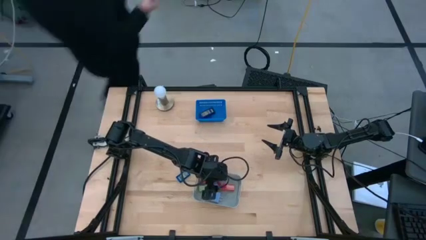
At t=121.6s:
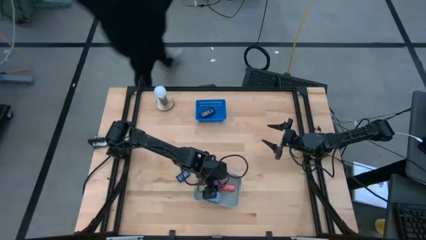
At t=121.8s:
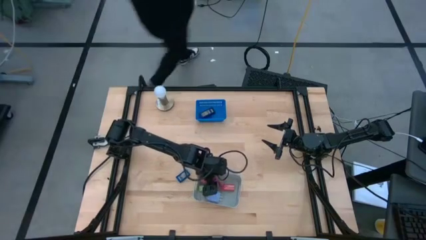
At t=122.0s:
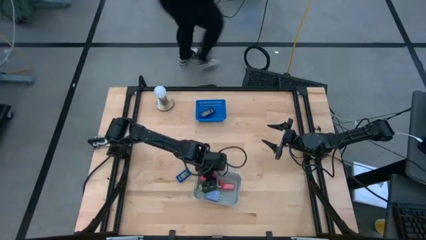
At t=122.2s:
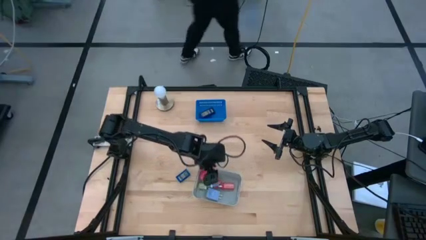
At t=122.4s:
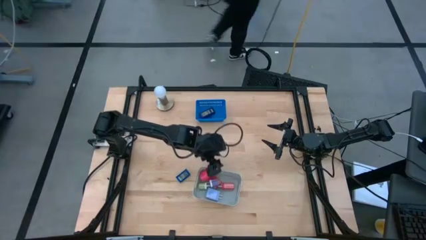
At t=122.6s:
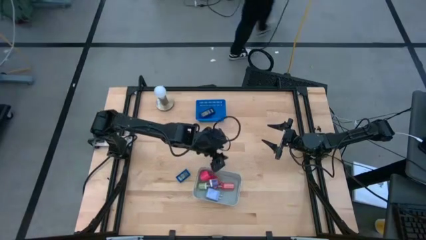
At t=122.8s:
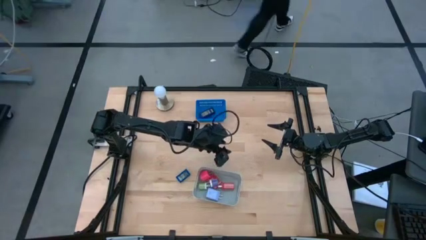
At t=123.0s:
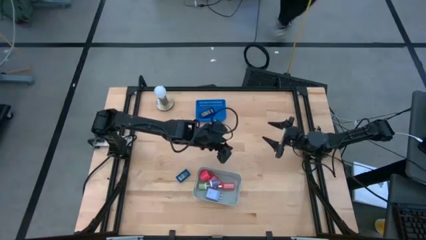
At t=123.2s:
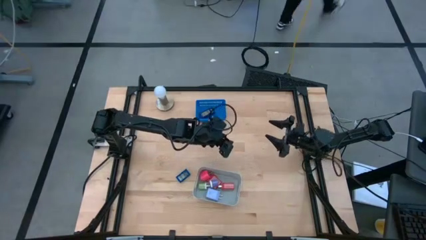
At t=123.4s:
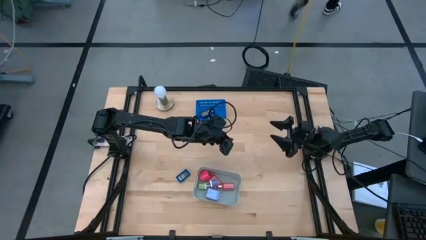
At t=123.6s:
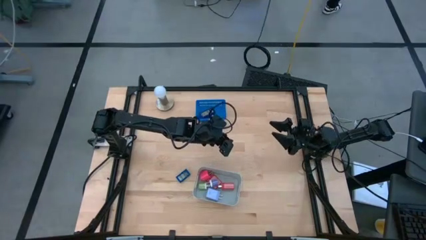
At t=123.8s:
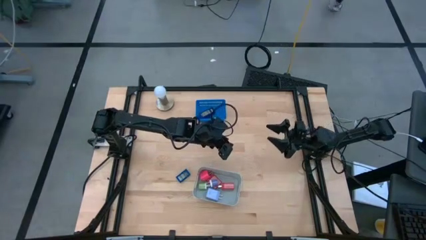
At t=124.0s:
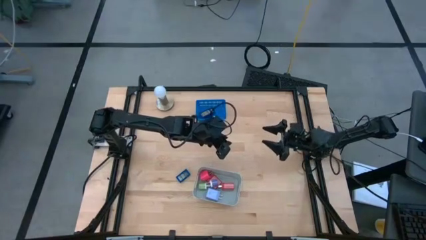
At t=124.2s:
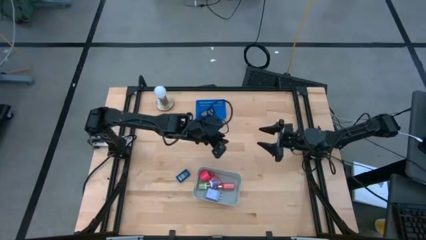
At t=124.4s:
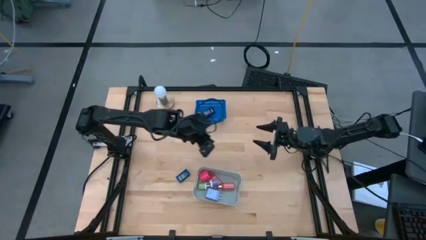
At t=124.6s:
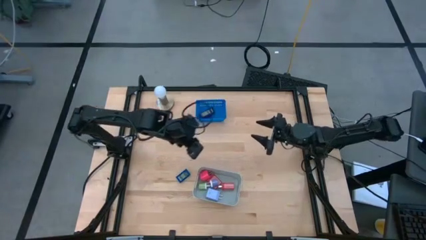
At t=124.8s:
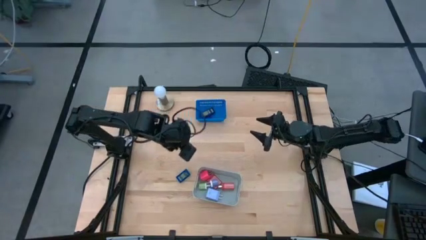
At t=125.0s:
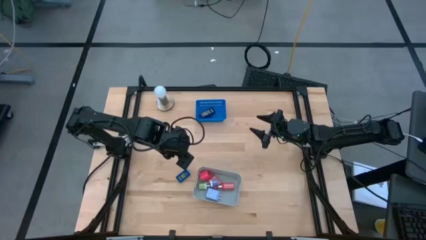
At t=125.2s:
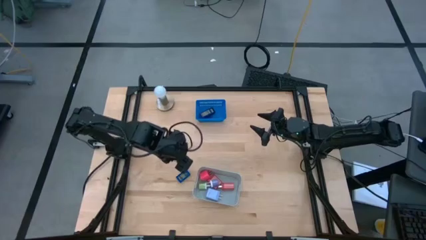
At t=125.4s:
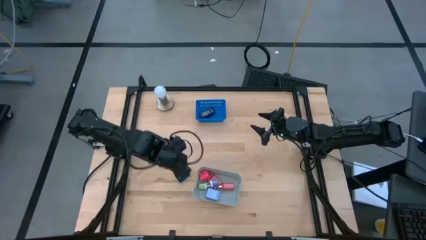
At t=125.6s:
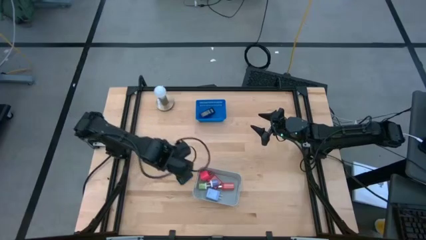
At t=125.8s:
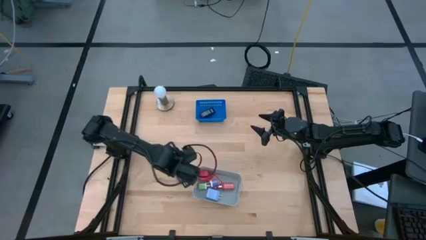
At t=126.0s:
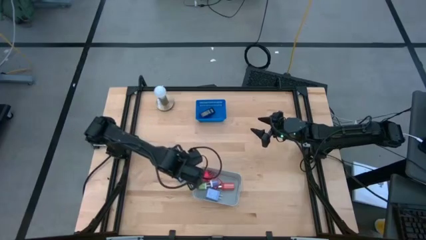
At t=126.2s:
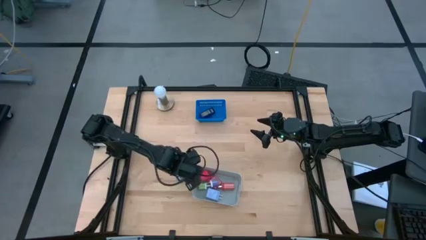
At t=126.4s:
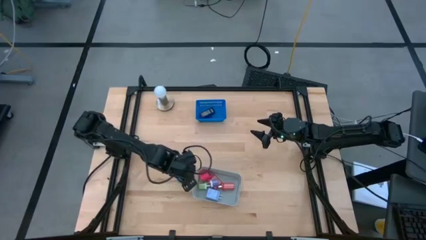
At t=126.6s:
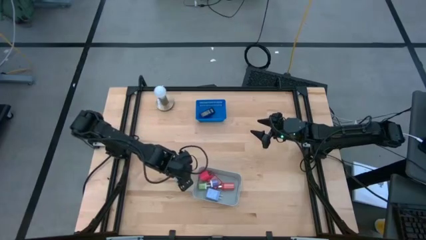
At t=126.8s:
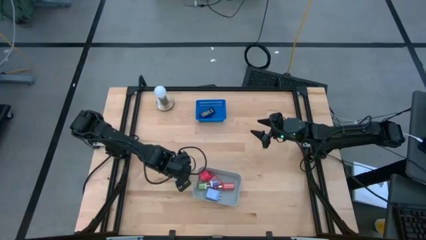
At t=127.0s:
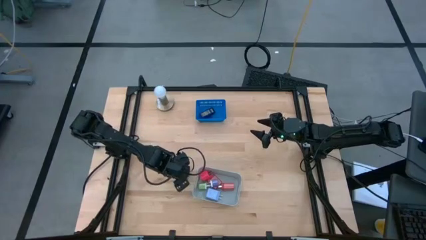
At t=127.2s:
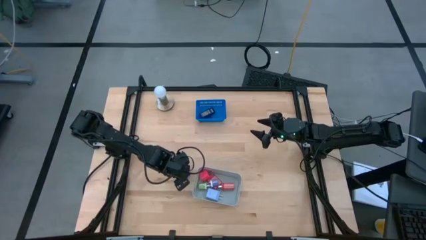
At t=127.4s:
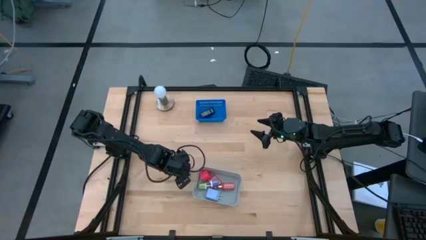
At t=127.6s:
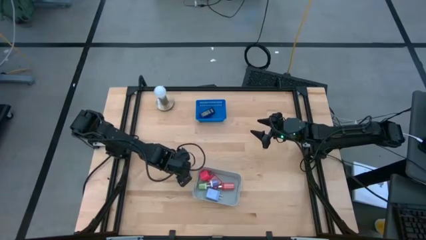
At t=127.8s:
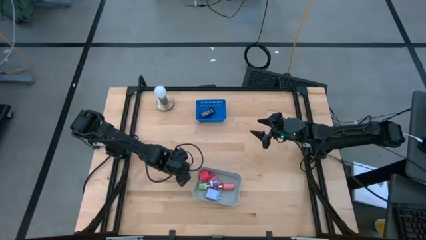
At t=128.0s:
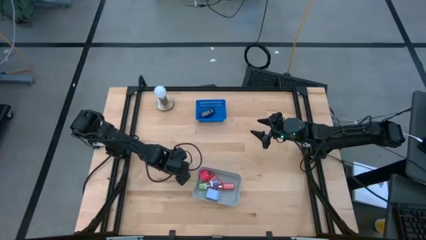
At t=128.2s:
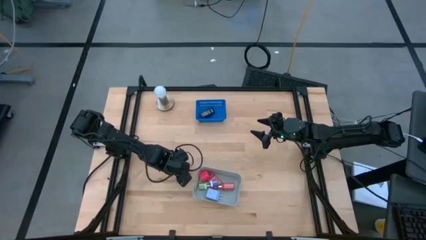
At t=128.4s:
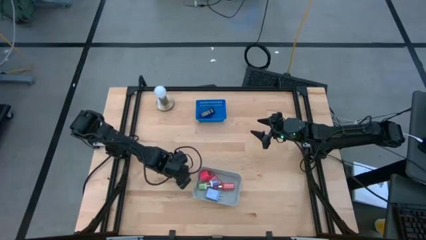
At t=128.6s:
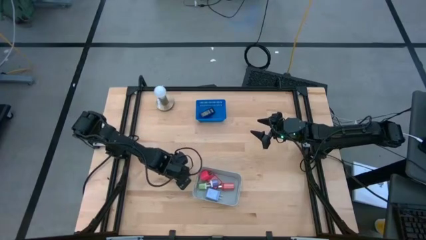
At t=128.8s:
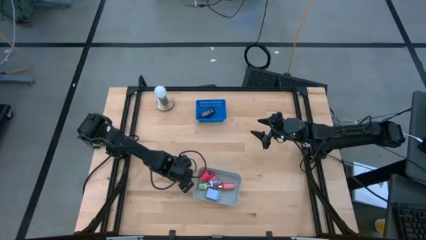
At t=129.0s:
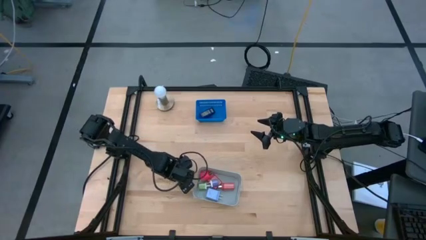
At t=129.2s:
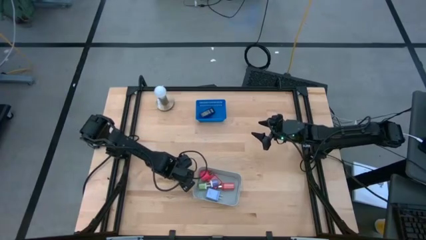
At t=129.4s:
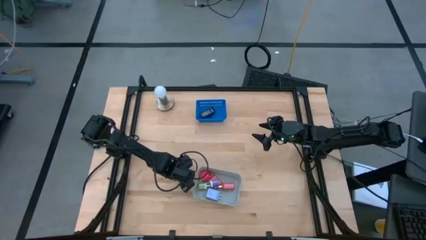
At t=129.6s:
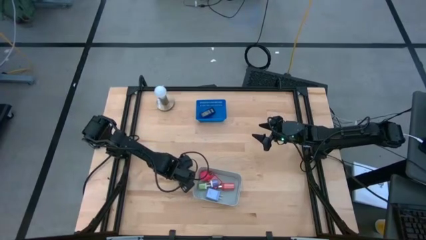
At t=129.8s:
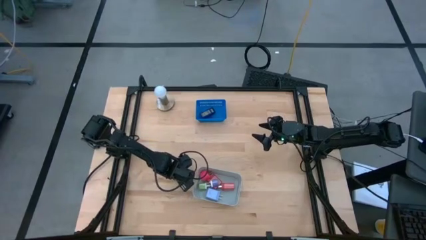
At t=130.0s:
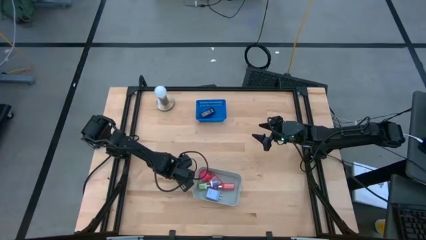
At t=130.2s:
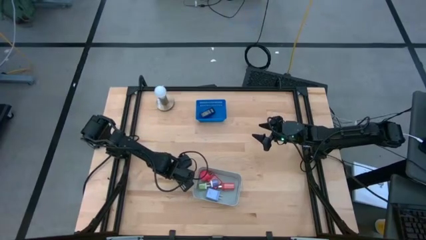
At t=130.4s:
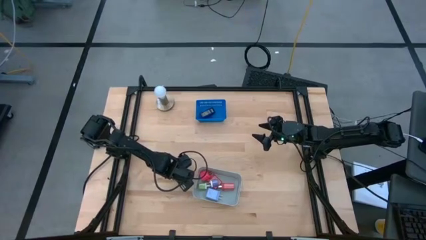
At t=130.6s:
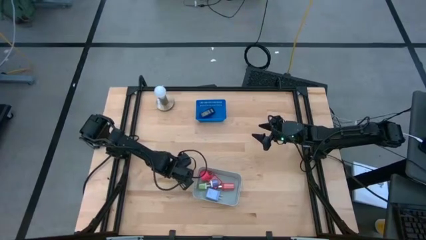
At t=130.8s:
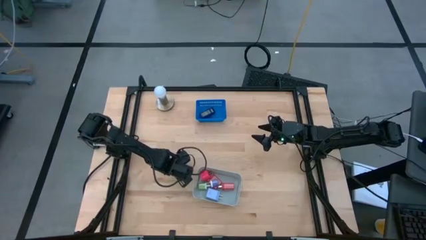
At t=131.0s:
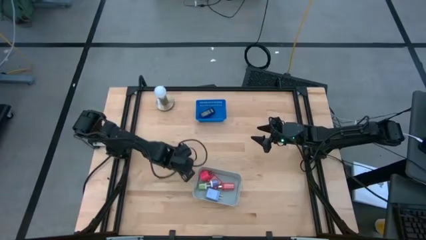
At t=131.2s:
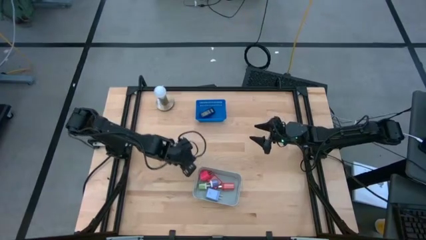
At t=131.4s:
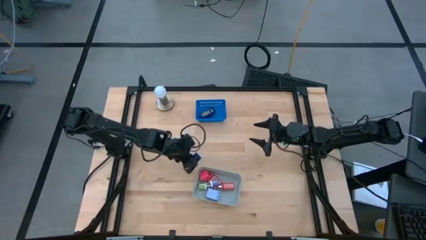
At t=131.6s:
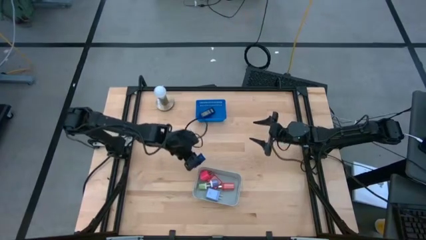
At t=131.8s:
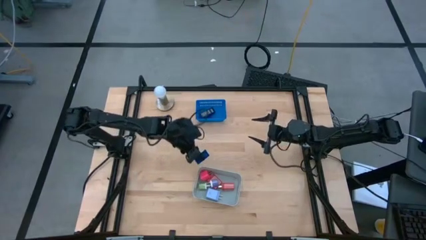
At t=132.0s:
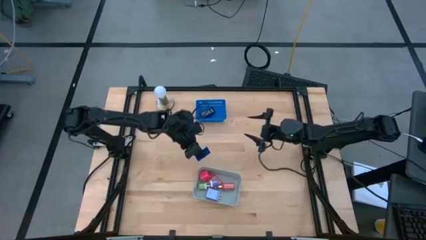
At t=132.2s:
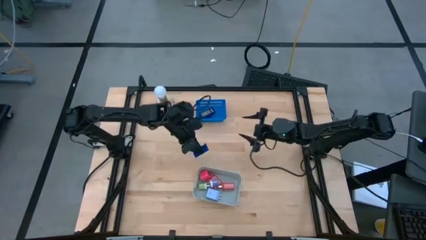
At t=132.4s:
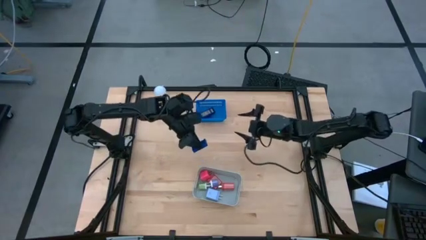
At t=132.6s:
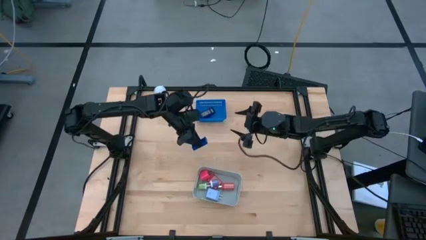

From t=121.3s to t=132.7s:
Task: Pick & Place Office items
Put the blue digital clock into the blue bin
